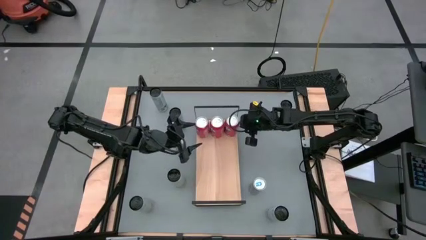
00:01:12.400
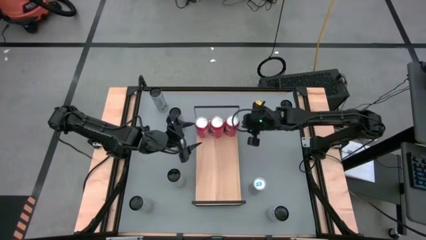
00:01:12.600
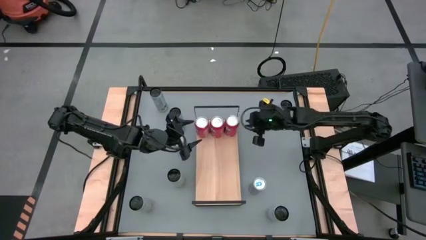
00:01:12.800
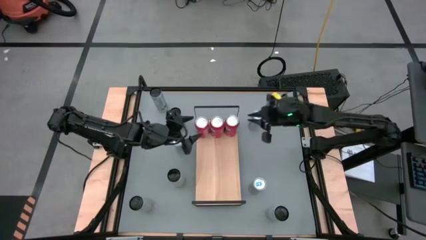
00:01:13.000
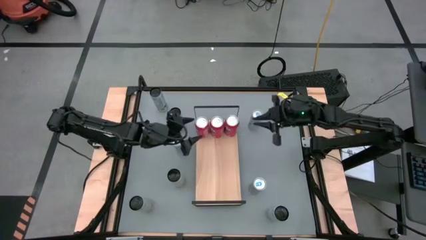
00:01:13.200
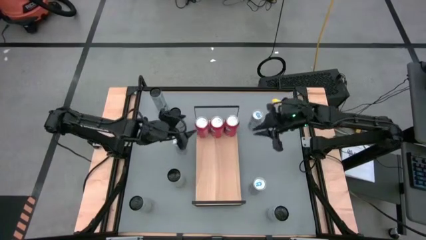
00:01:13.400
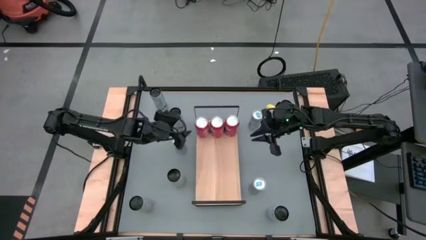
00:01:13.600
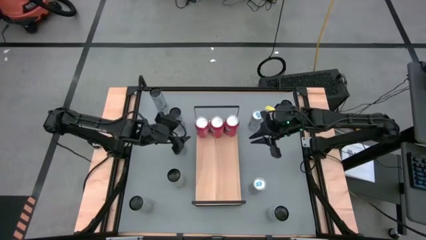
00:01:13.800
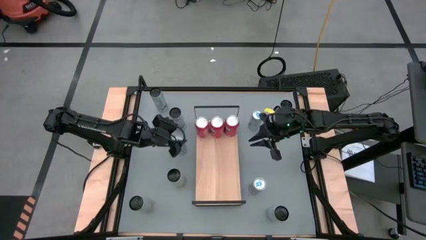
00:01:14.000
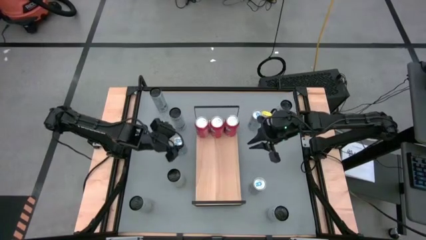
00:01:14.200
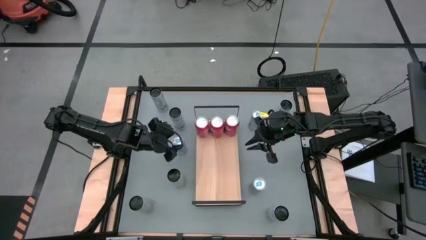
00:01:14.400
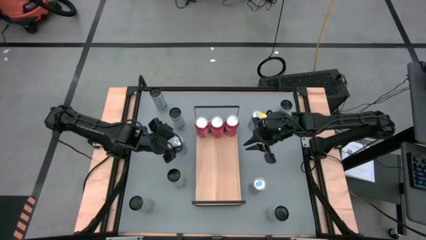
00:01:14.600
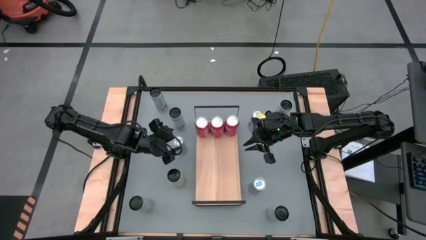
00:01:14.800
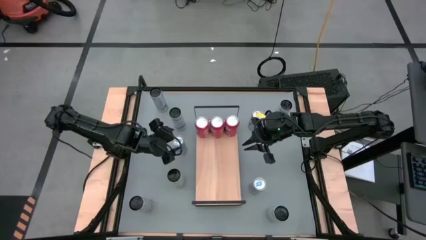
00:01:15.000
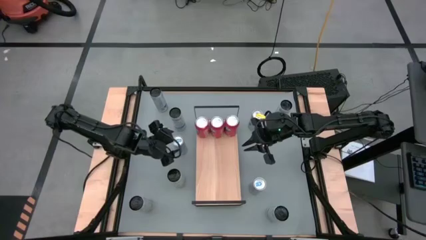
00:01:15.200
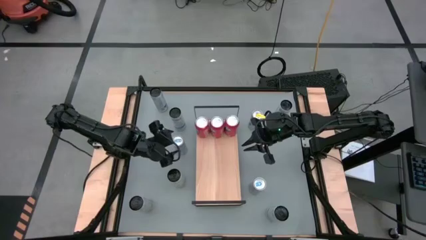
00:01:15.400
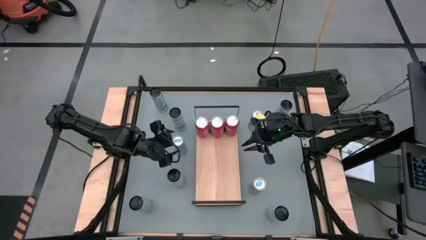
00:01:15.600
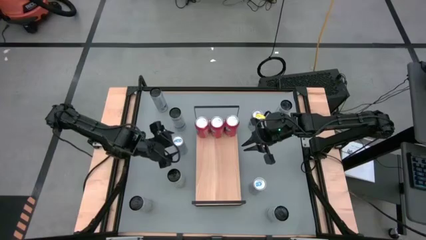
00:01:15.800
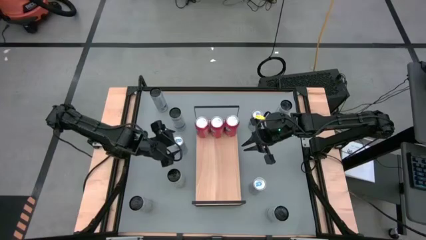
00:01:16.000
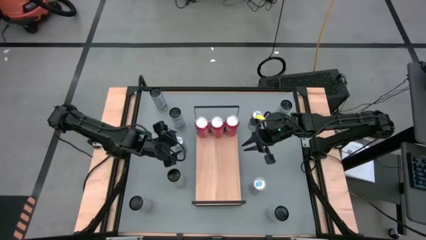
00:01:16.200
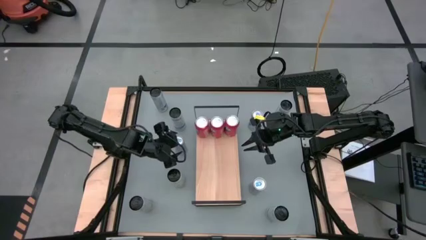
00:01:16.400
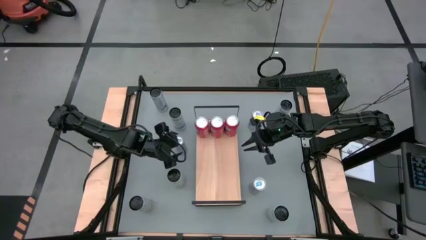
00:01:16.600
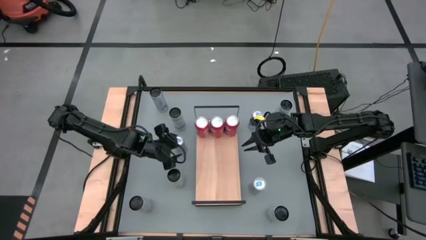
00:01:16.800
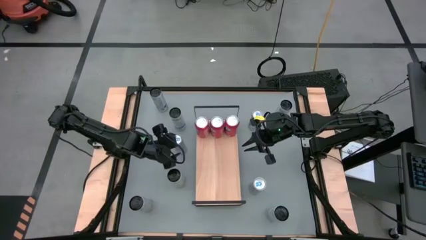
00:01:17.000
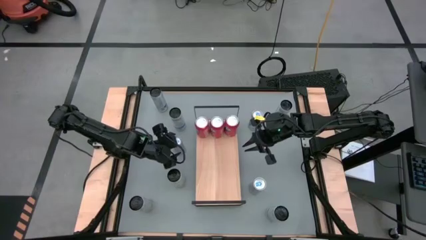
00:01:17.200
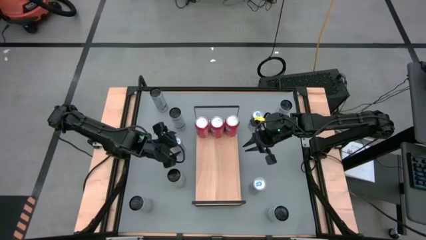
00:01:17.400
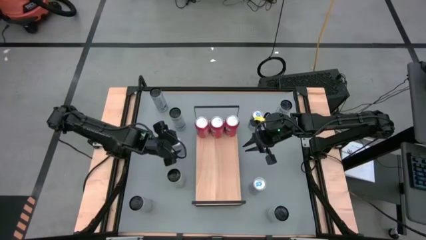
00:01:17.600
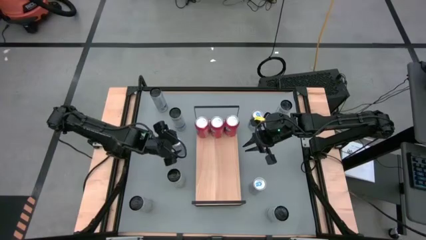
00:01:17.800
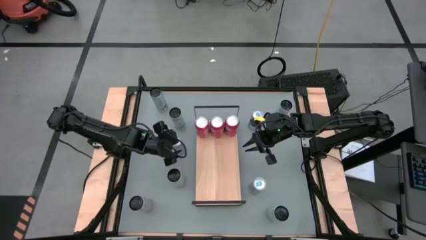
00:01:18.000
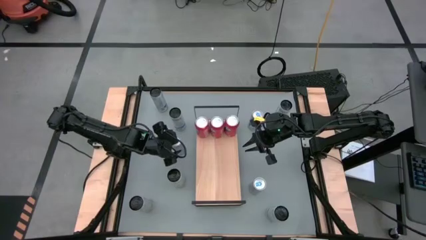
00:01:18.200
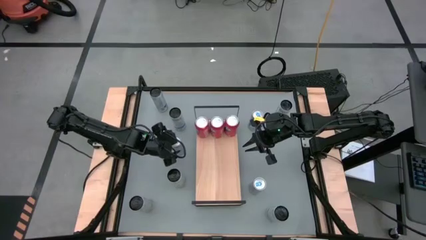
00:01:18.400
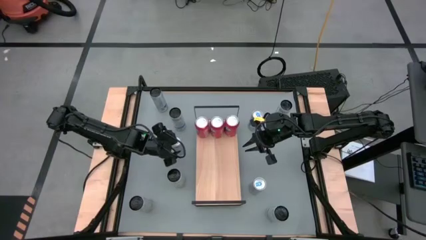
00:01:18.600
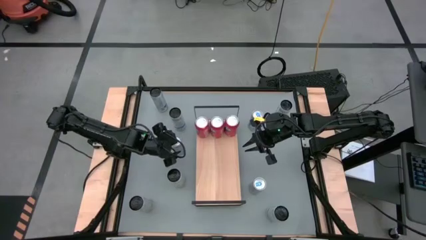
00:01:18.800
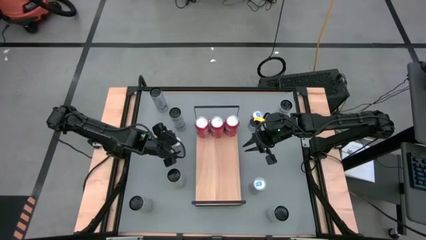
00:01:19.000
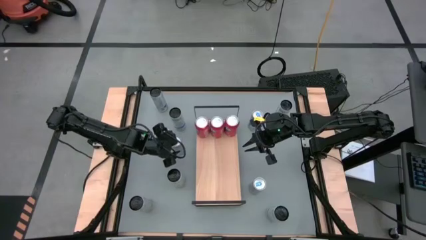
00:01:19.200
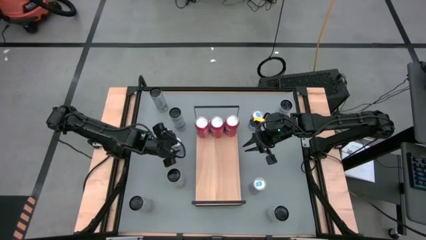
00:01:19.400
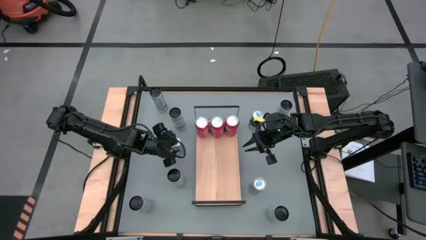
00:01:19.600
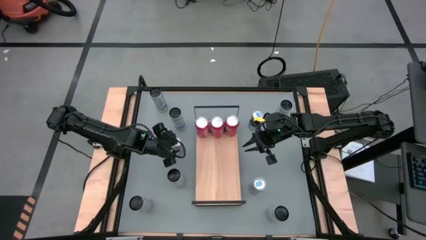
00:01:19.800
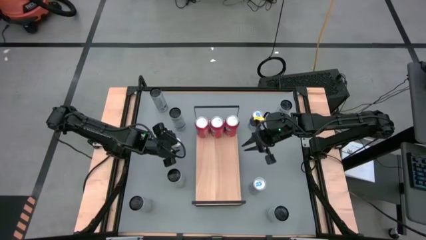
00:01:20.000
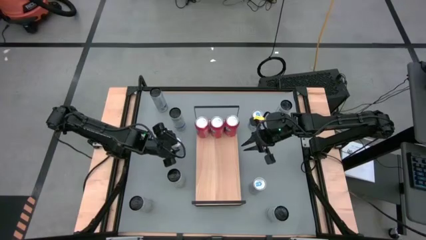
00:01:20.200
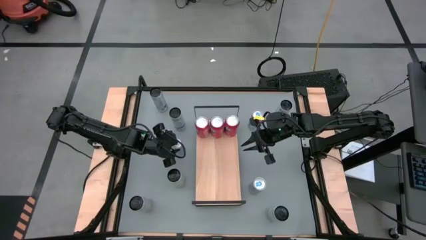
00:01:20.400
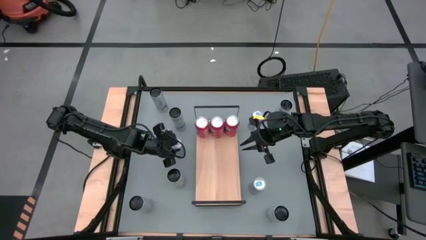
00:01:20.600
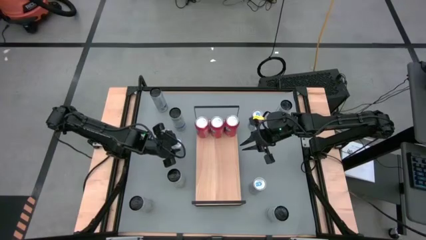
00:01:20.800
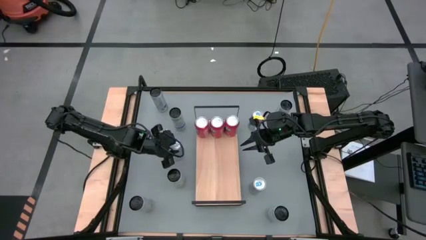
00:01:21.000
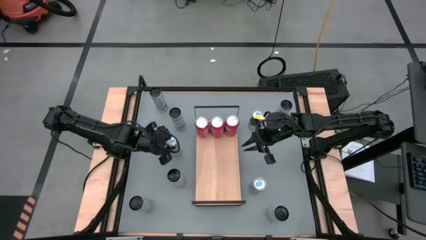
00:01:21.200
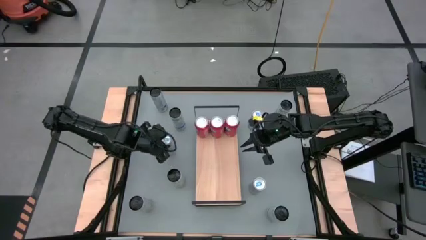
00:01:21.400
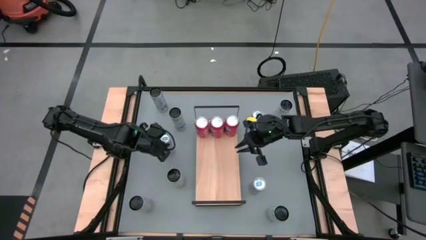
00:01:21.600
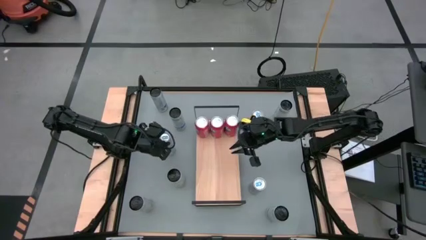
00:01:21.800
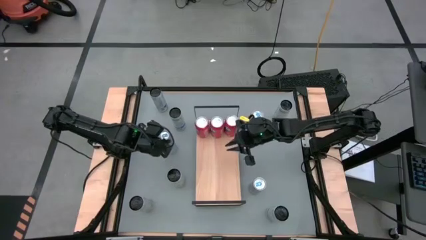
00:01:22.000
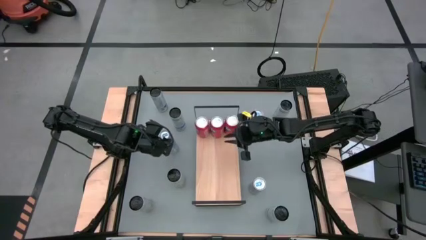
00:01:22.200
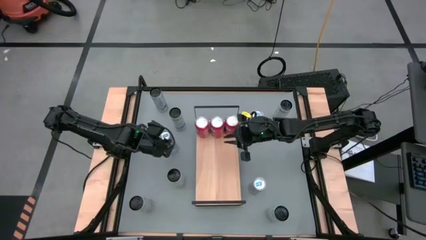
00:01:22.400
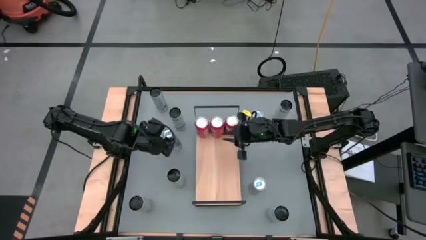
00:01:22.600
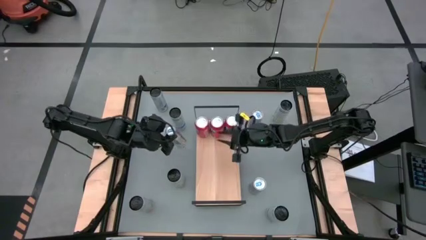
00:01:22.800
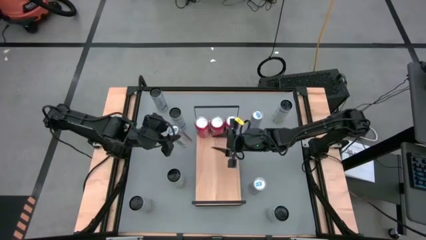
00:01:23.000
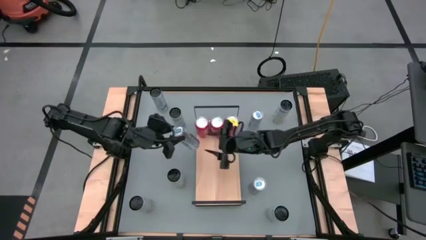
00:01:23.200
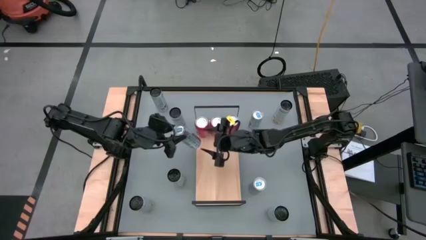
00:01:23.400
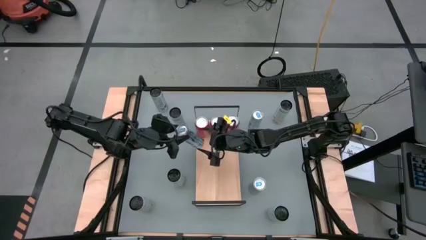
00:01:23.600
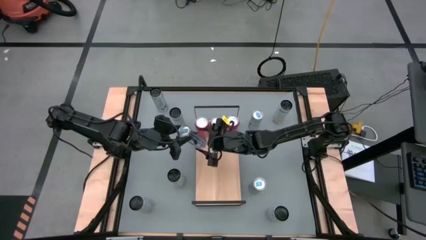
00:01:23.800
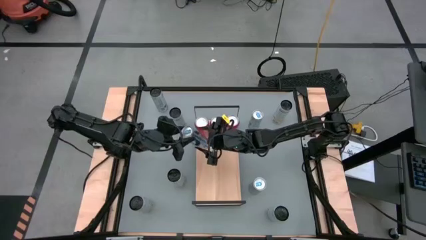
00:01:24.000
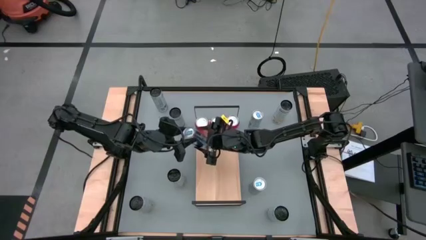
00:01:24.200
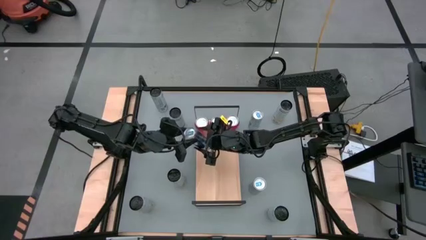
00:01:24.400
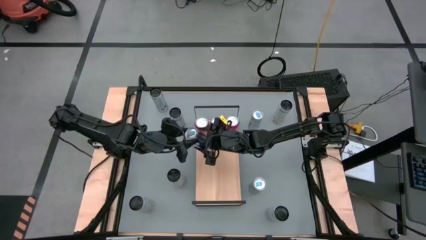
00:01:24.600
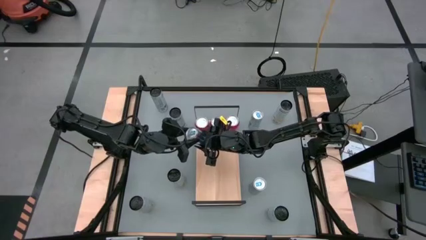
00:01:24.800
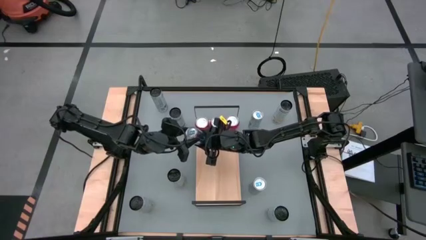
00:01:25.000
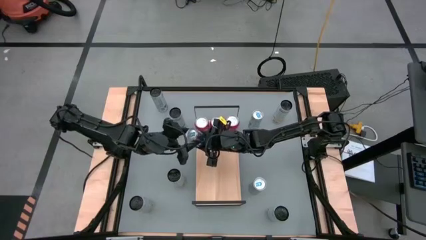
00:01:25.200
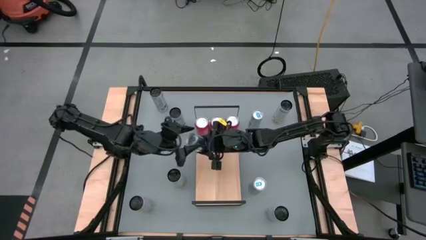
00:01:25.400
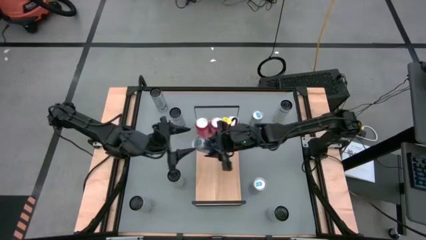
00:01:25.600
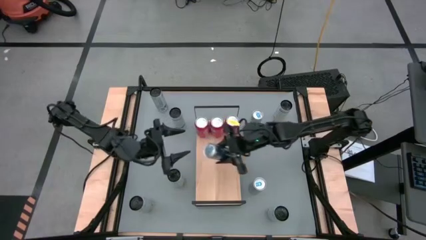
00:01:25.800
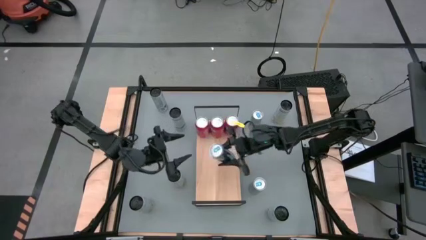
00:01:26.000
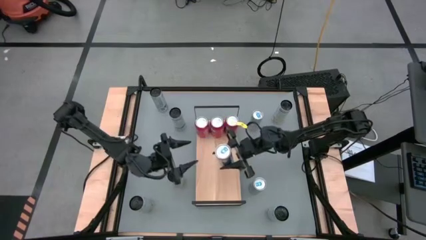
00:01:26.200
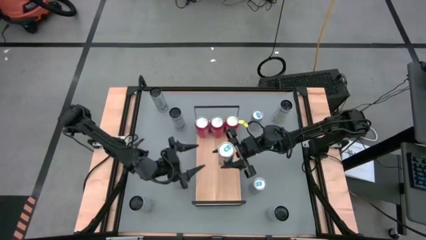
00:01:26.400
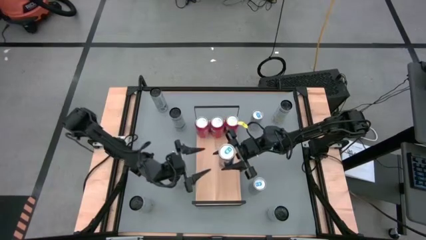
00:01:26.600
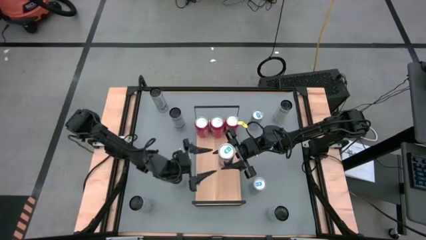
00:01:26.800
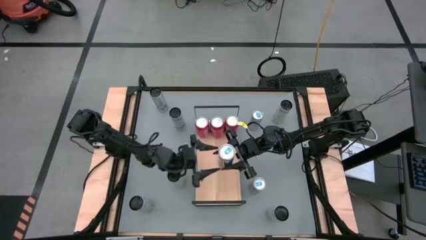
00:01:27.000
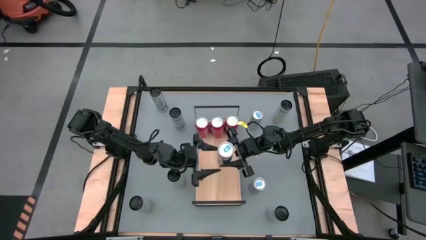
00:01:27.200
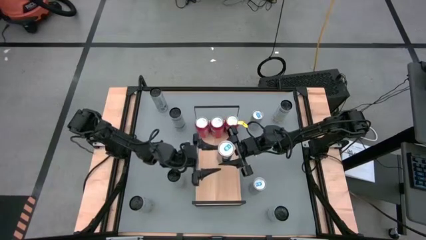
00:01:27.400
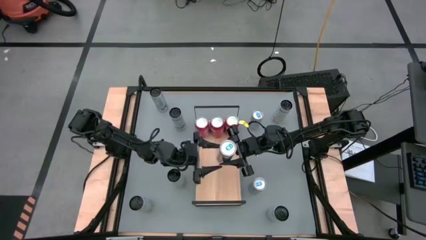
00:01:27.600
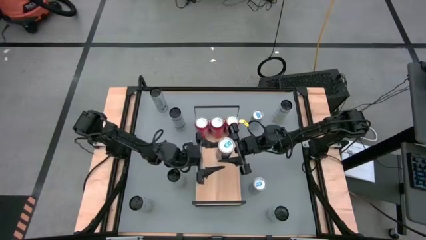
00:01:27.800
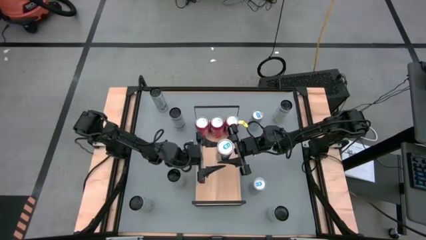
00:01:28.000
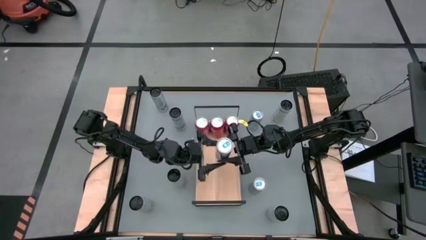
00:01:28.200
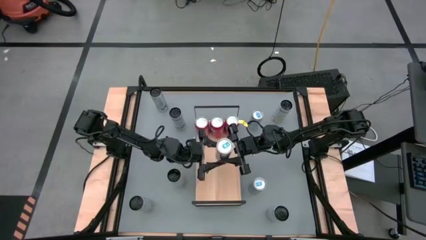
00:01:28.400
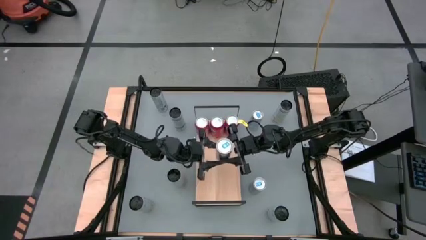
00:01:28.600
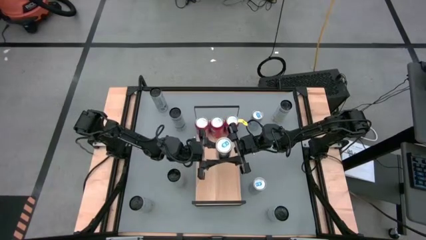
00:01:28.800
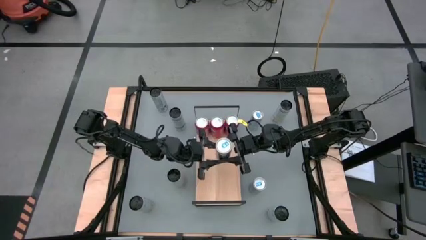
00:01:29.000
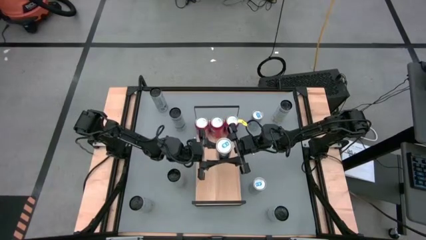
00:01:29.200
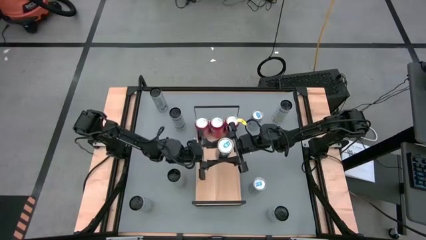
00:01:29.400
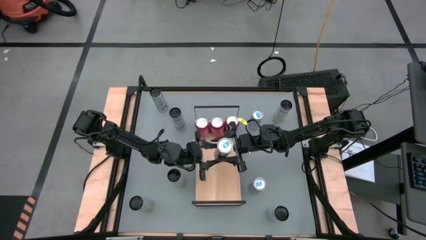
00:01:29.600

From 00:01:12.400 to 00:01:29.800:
Task: Place canned beverage on shelf
Put the middle blue soda can on the shelf
